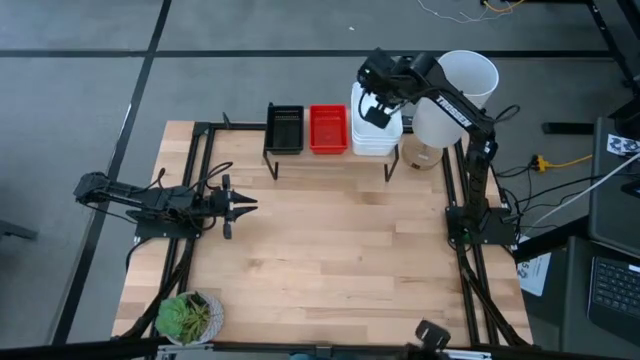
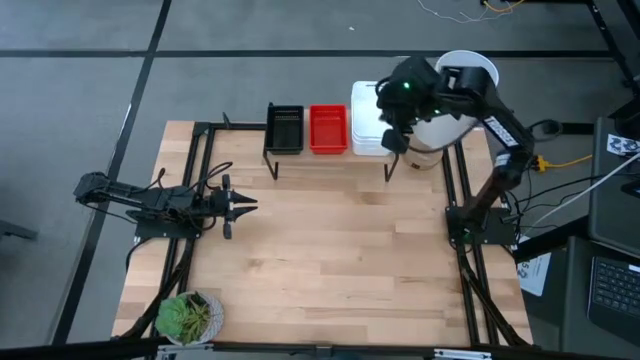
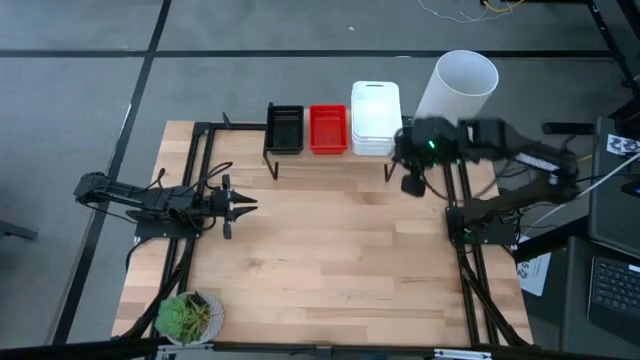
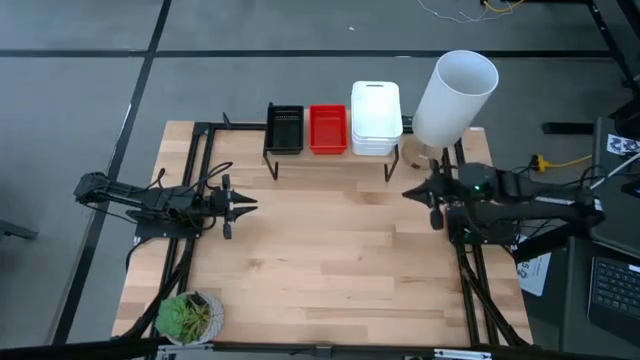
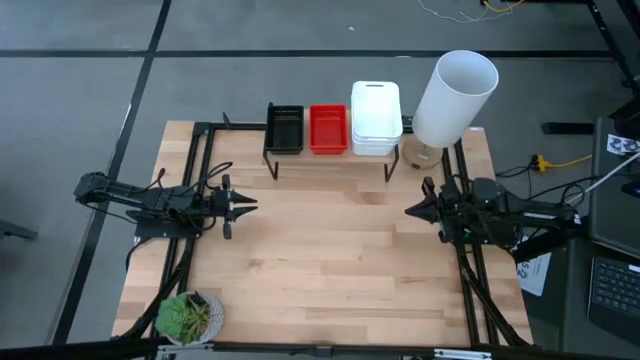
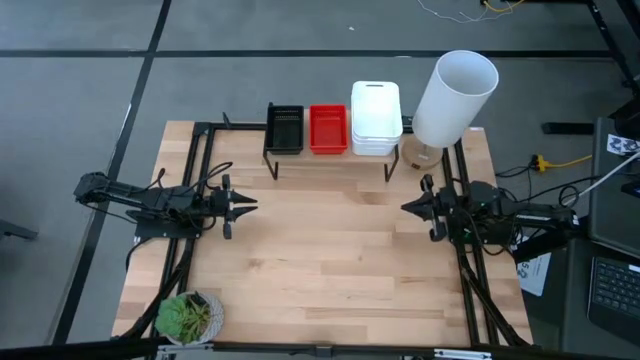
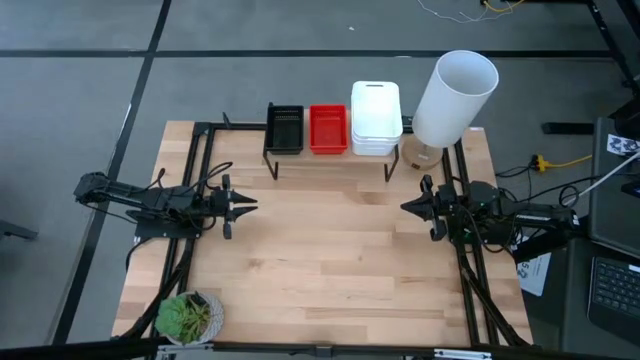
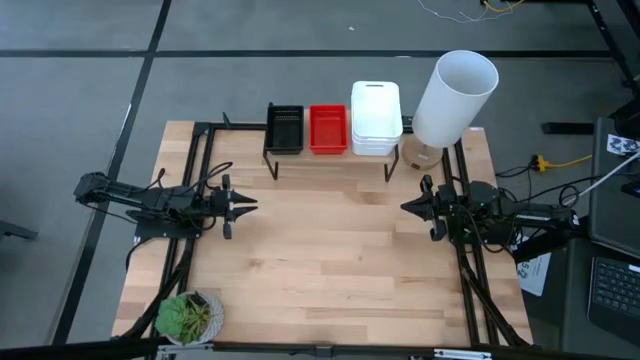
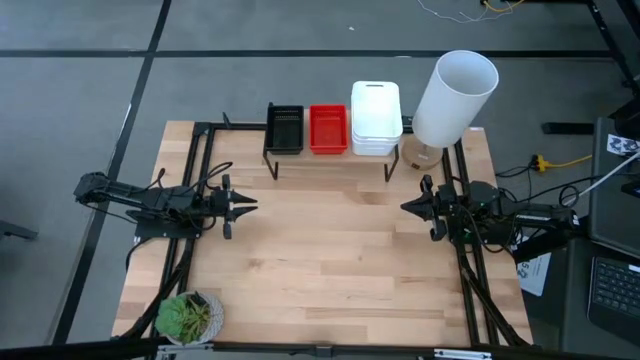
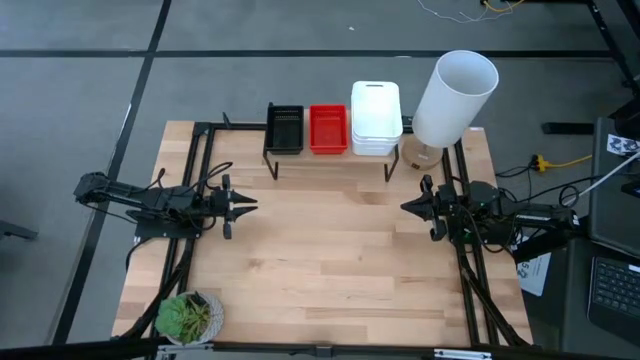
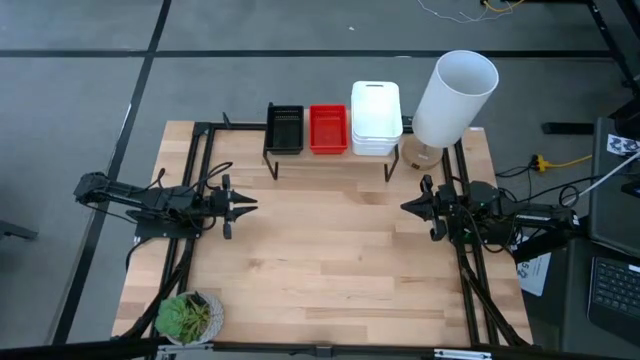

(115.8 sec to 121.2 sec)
Task: Stack baskets on shelf by color
Return to Home Position

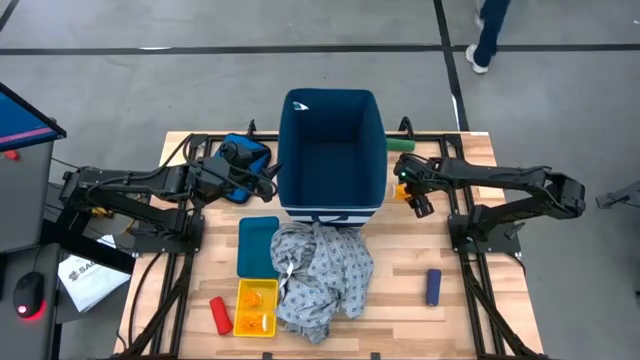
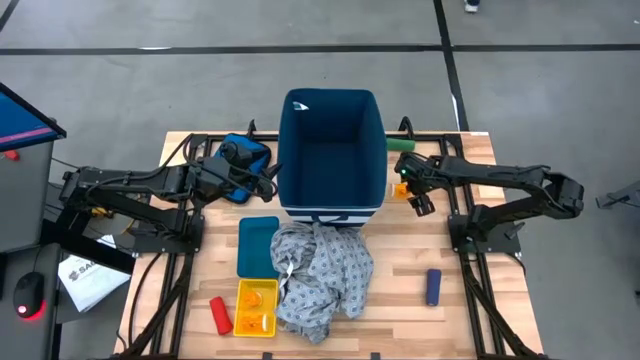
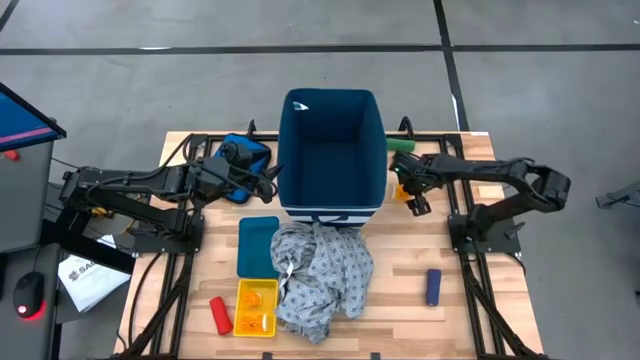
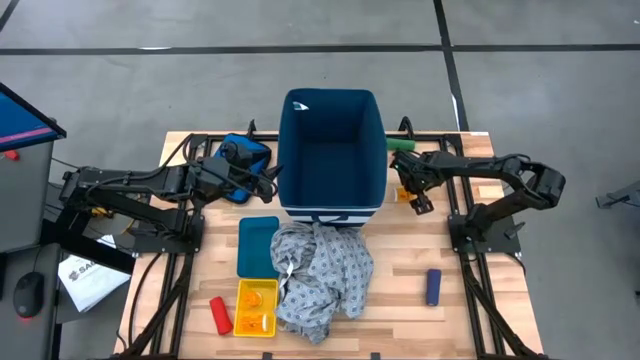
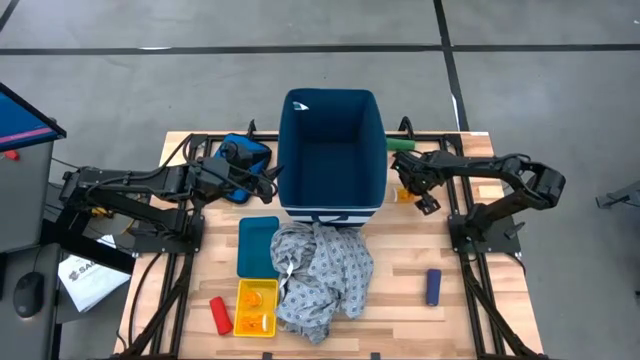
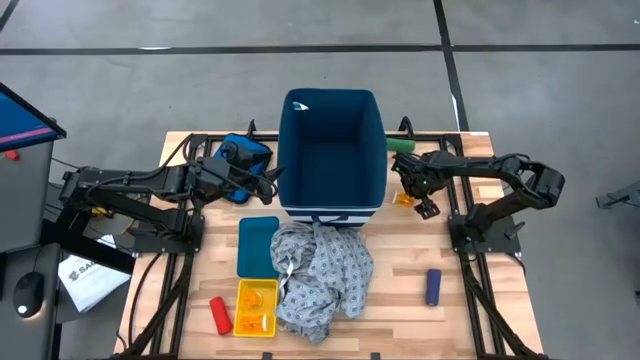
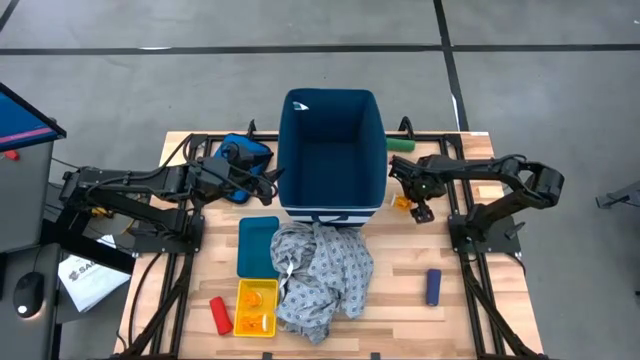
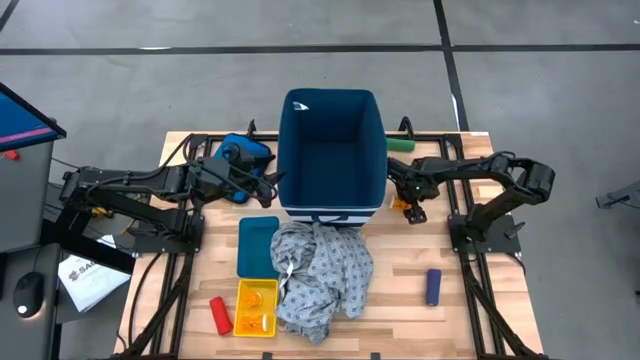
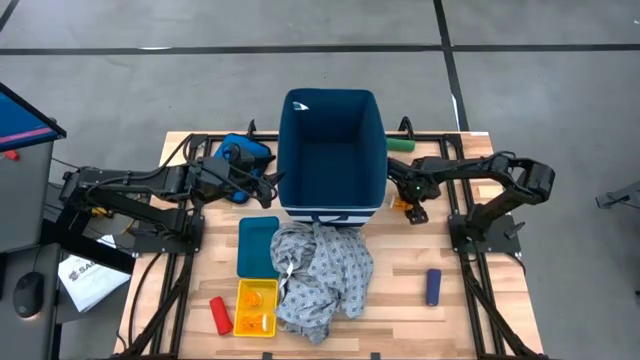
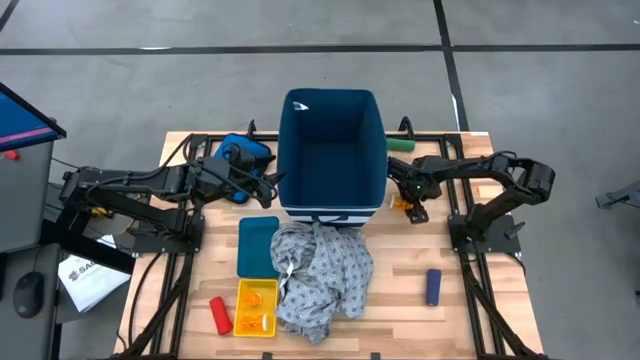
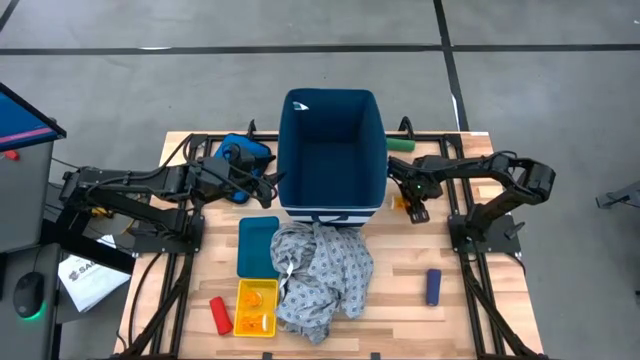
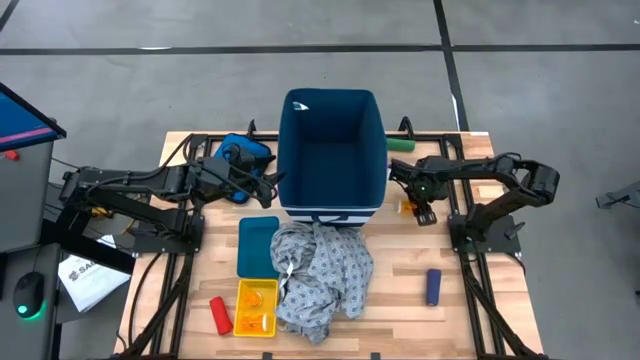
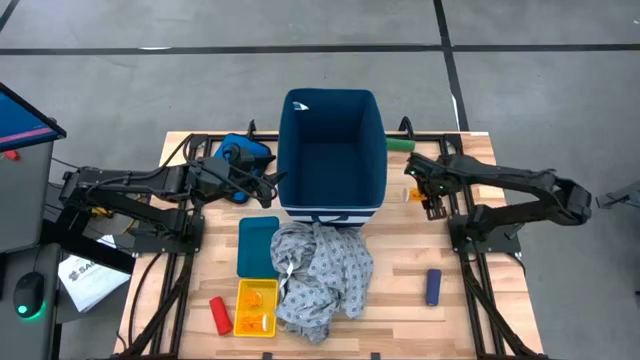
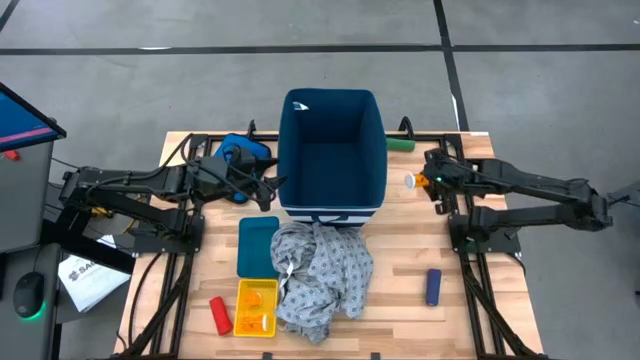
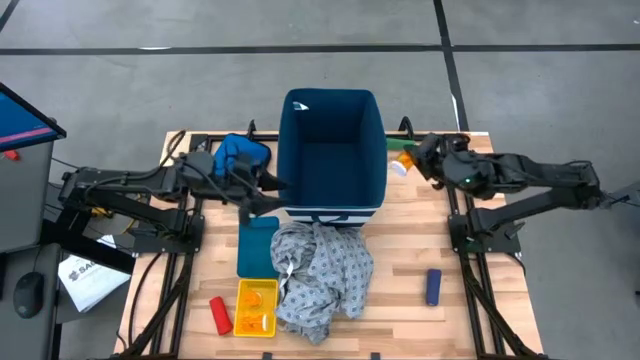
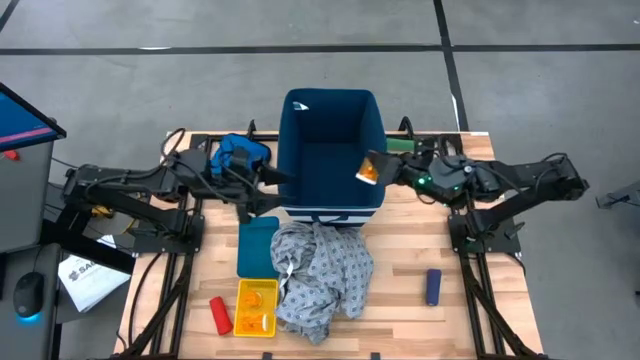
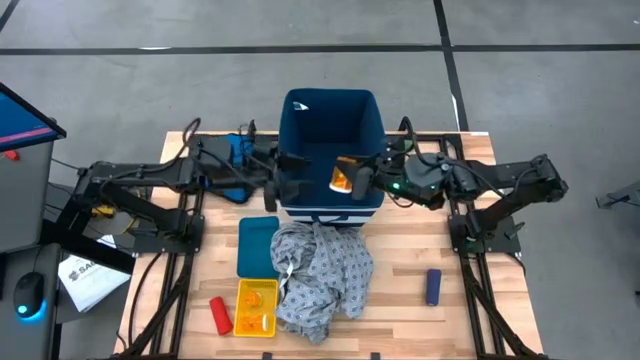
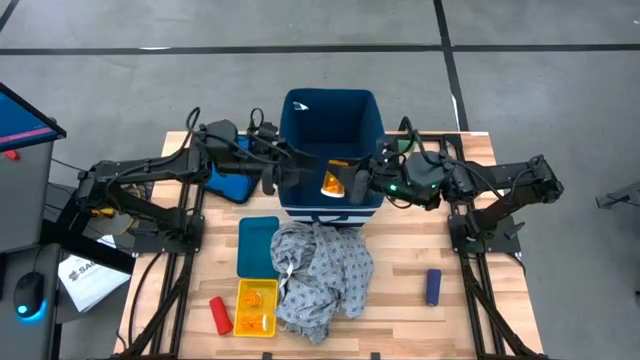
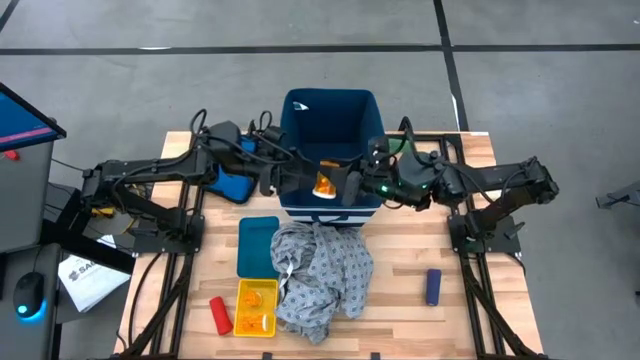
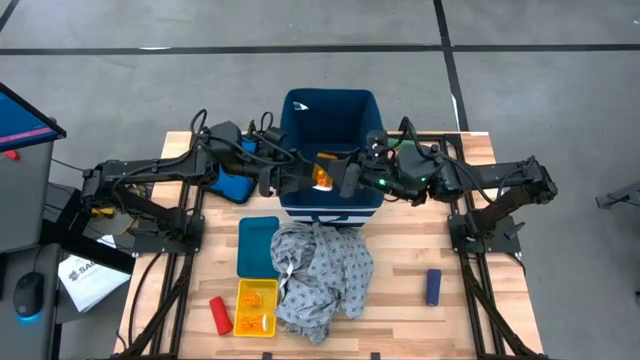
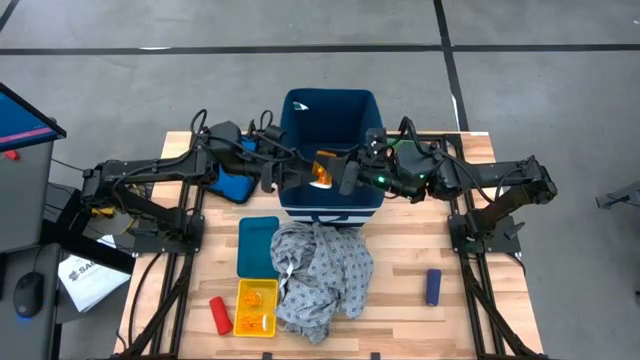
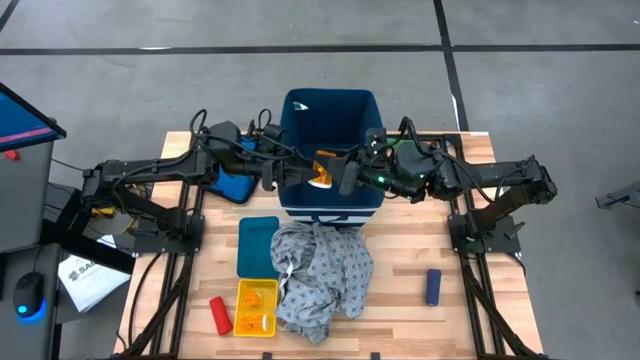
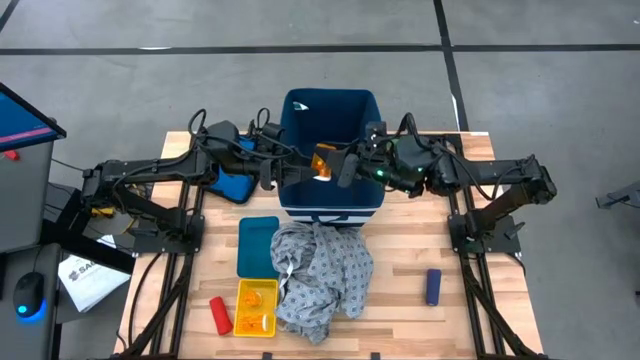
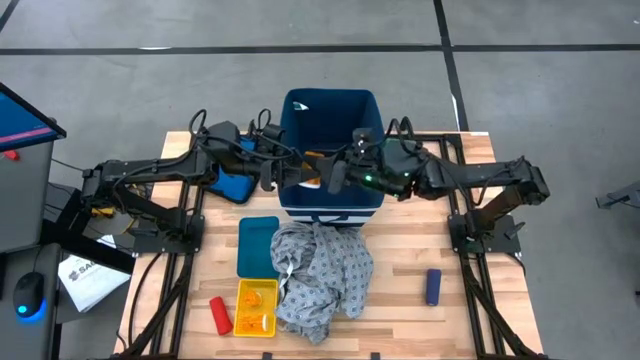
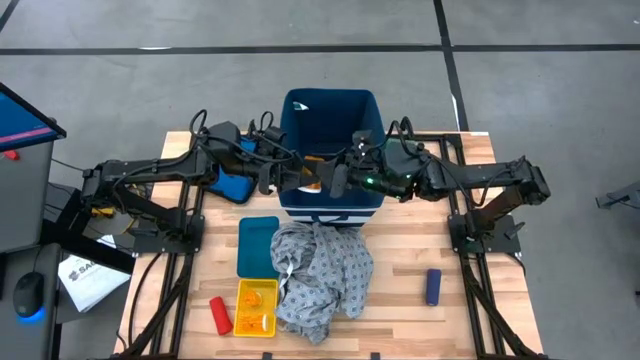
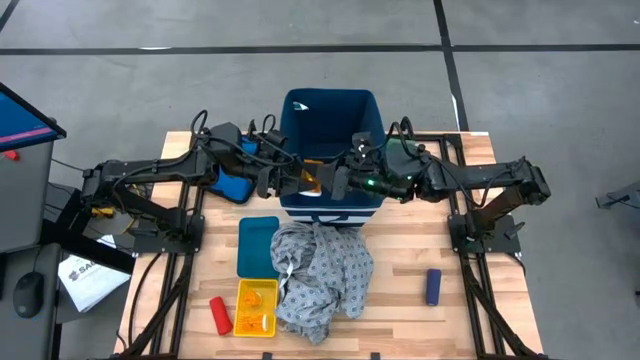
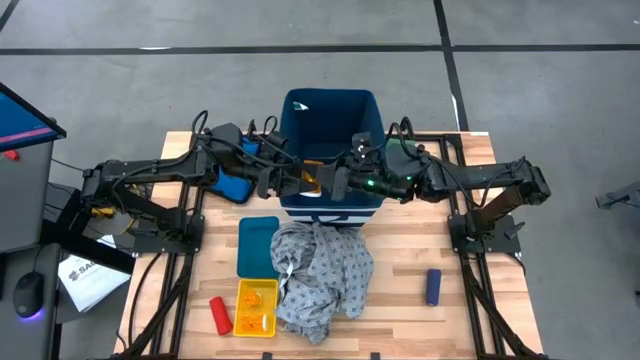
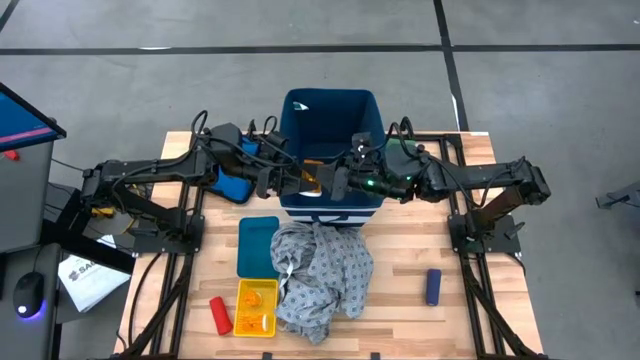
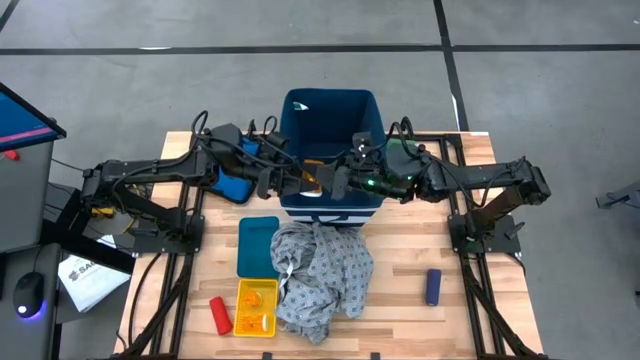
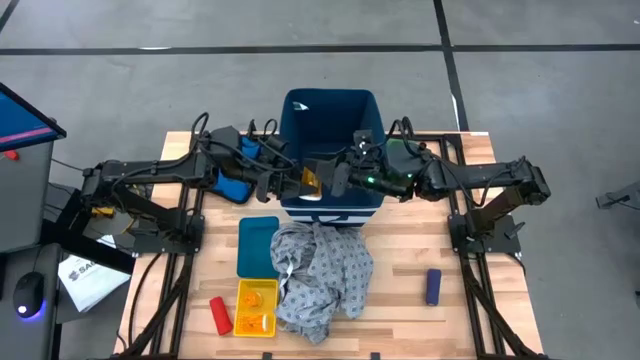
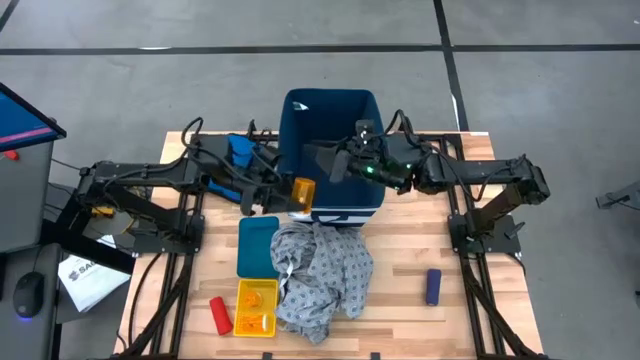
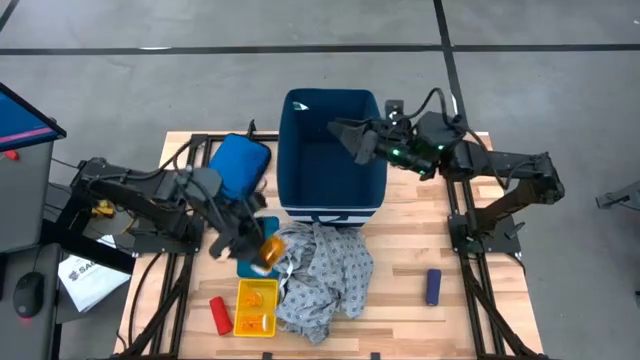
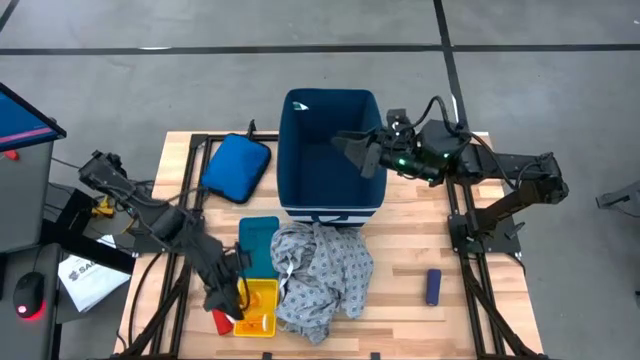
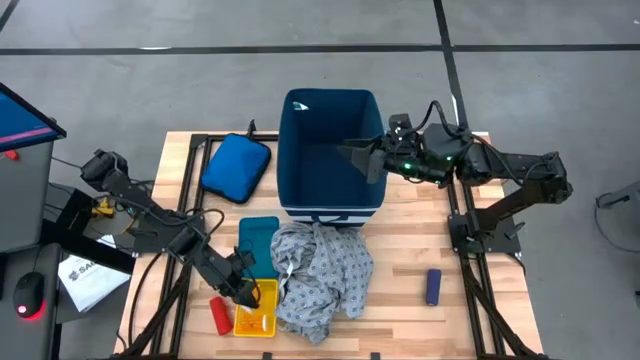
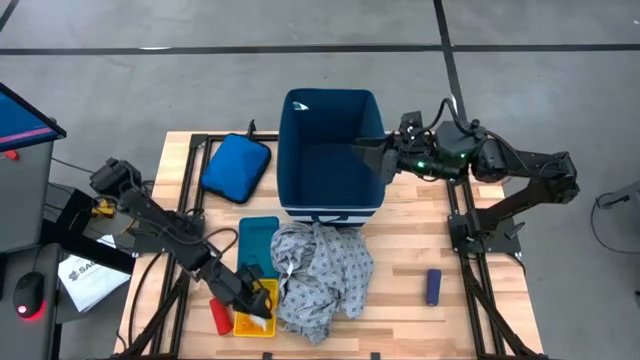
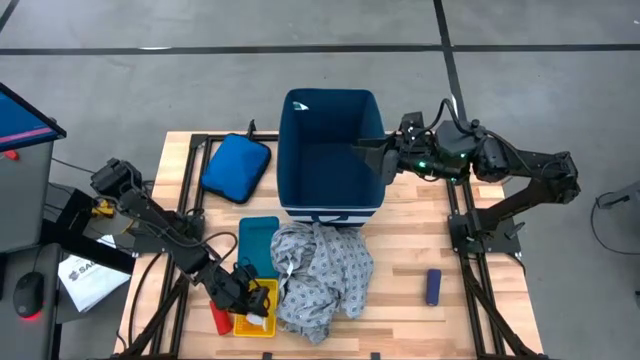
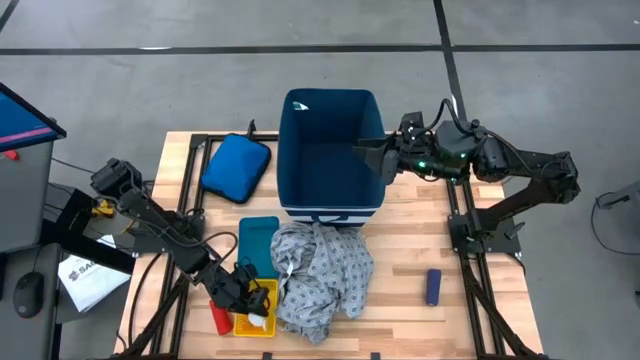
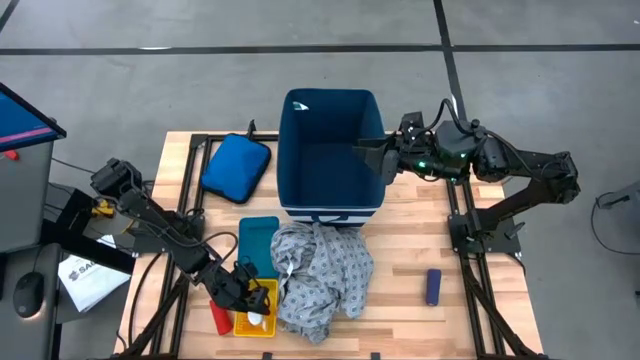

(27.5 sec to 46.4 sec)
Task: Pick & place medical supplies in basket/bin
Put the orange pill bottle into the yellow bin
